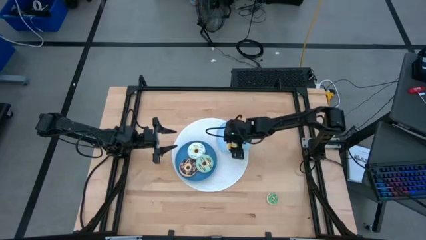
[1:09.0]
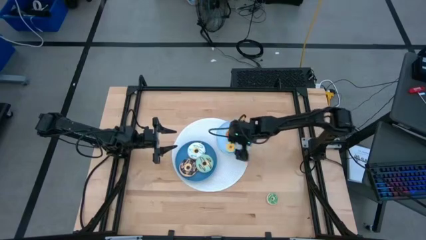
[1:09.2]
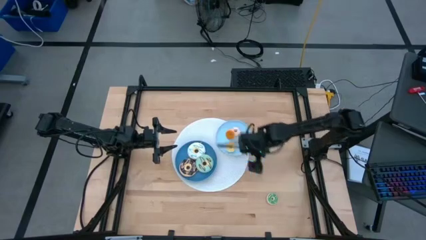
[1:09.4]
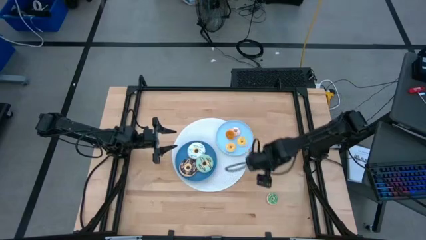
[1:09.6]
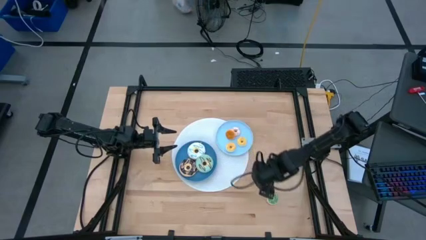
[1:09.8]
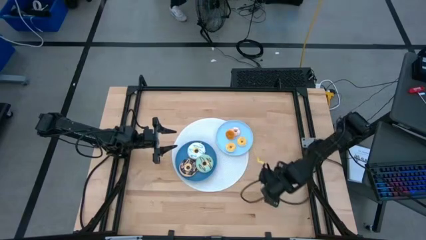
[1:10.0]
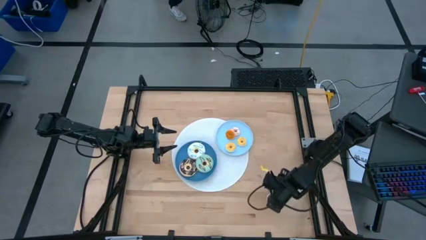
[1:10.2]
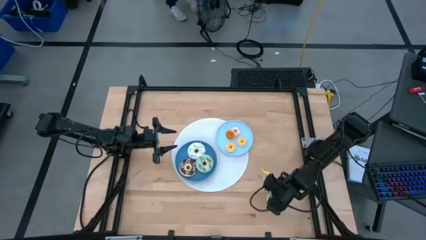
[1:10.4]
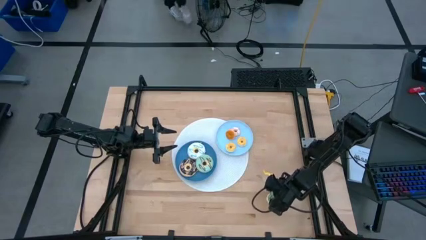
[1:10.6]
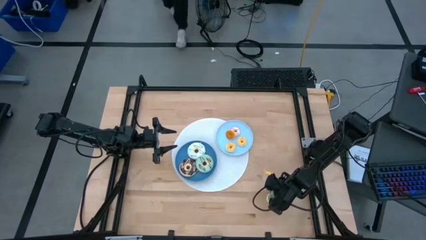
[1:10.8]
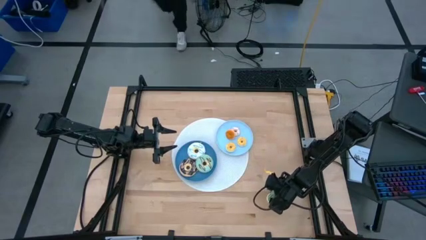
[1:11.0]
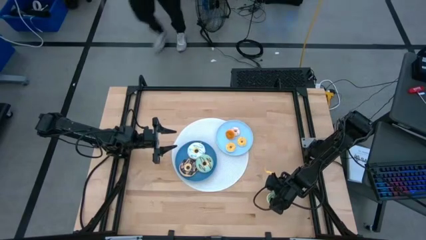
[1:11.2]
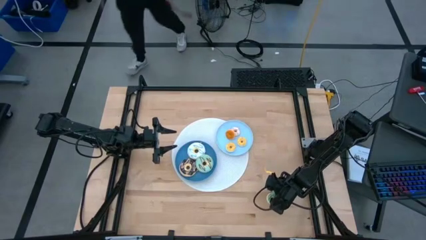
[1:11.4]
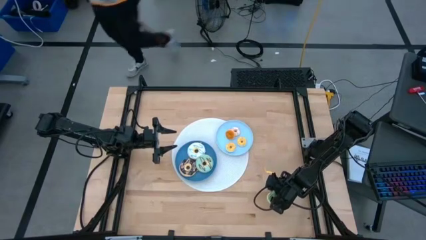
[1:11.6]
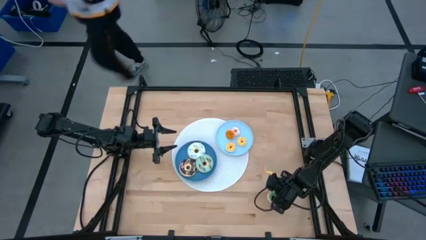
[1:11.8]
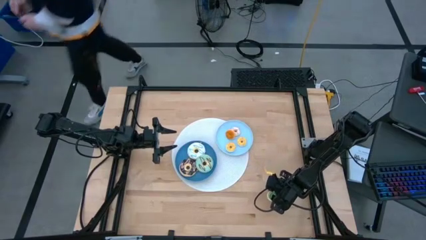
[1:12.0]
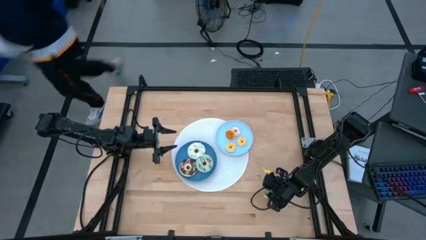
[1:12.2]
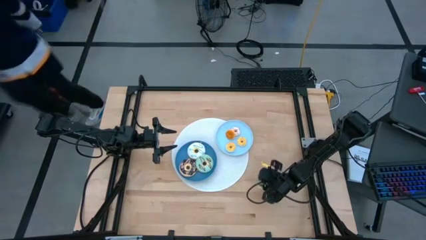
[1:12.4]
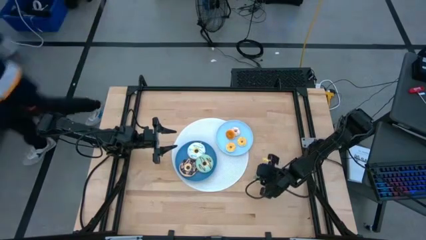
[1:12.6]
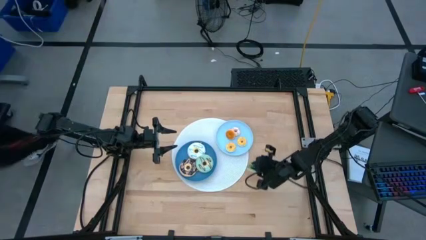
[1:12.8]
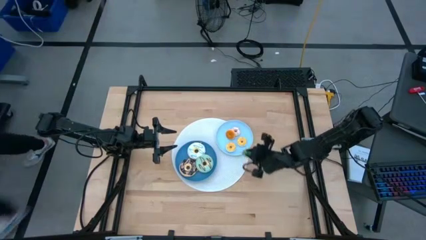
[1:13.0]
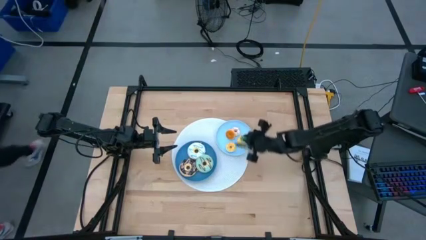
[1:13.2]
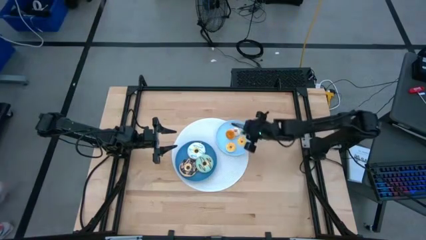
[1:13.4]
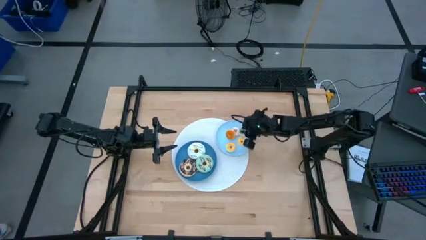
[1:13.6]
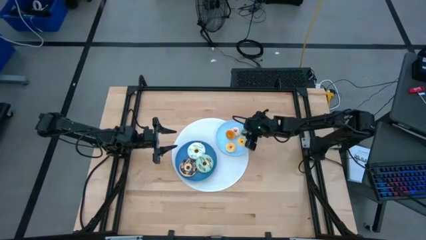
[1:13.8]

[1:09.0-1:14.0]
Task: Pick & Place donuts
Put the small green donut on the light blue plate

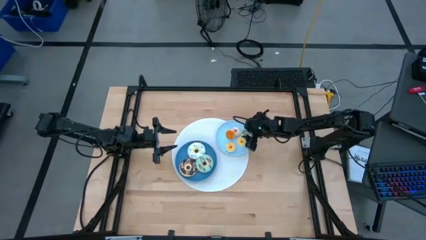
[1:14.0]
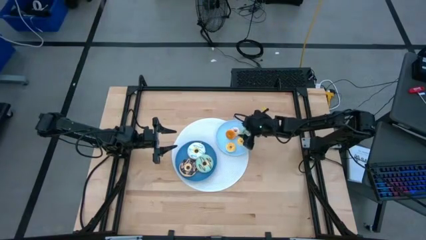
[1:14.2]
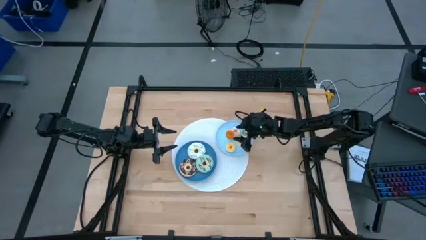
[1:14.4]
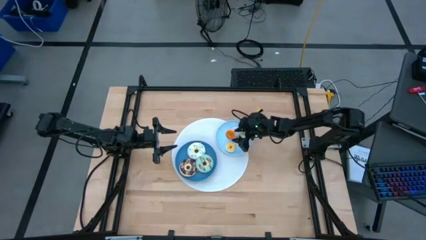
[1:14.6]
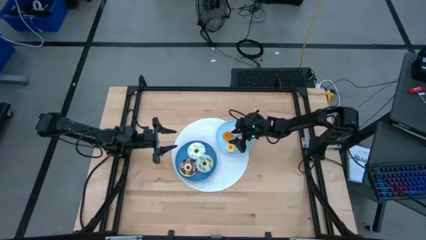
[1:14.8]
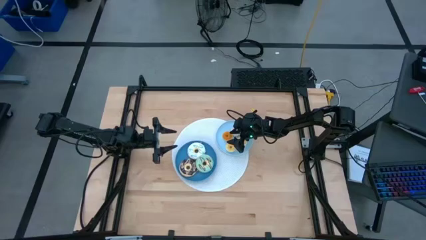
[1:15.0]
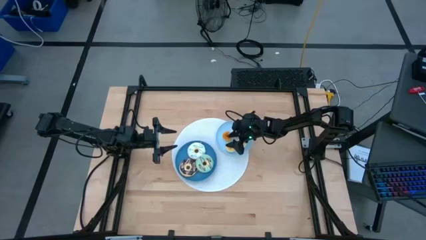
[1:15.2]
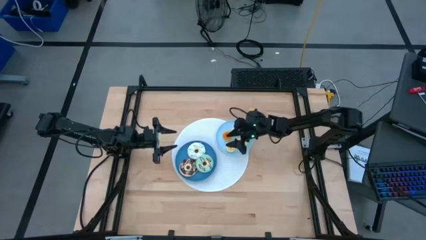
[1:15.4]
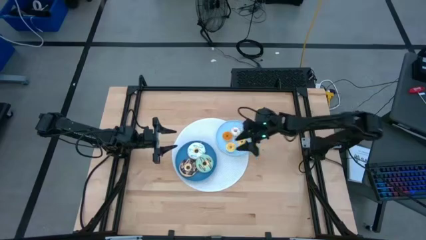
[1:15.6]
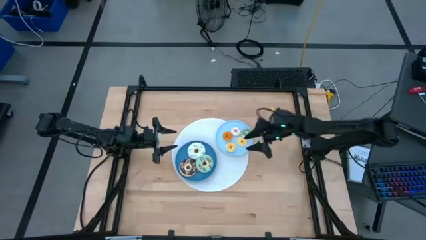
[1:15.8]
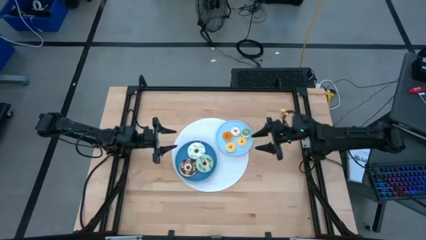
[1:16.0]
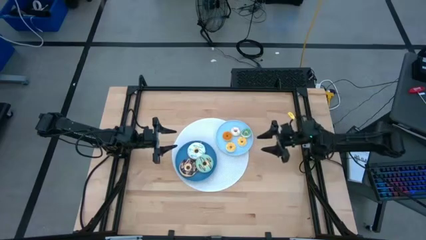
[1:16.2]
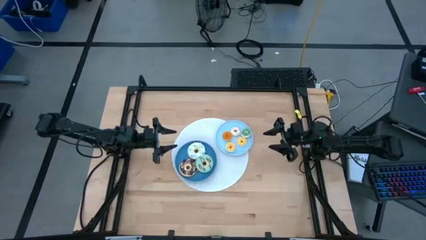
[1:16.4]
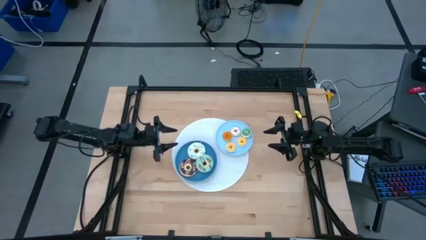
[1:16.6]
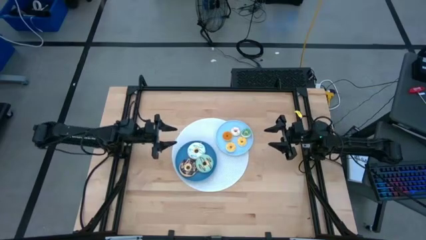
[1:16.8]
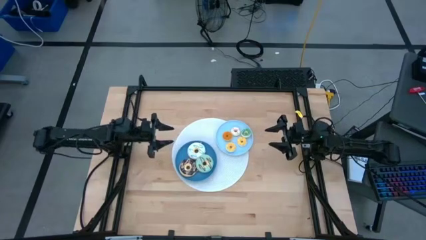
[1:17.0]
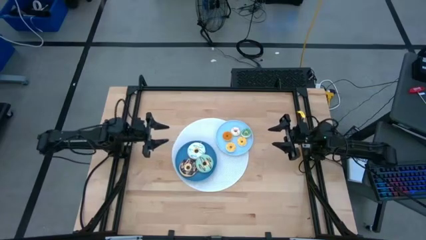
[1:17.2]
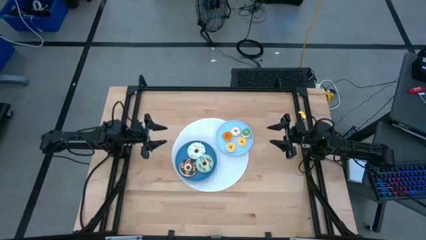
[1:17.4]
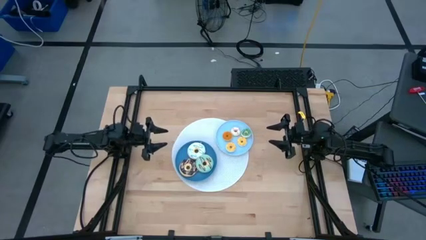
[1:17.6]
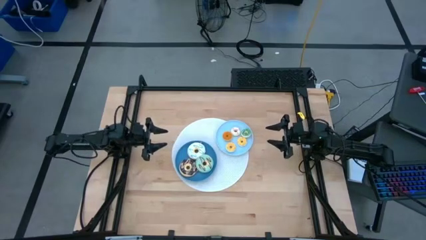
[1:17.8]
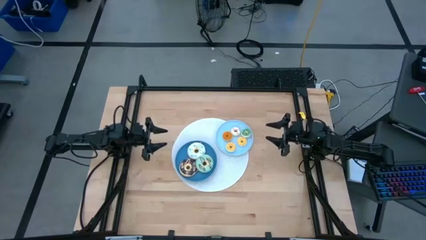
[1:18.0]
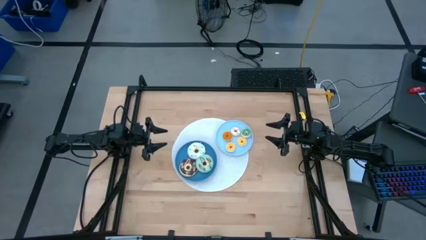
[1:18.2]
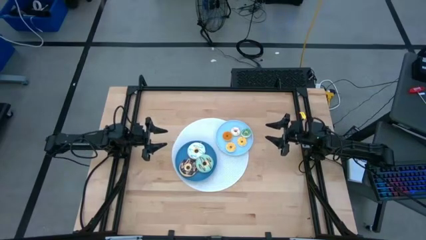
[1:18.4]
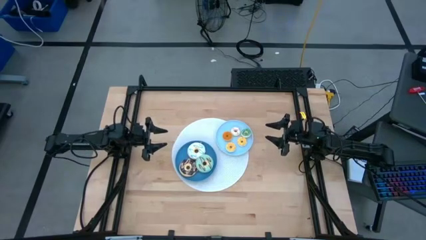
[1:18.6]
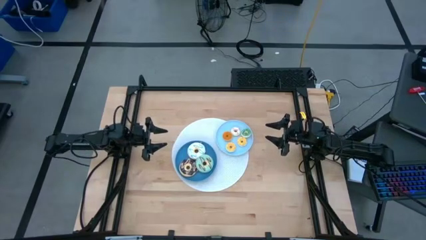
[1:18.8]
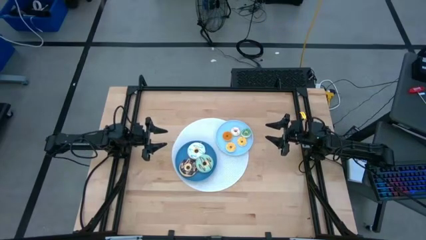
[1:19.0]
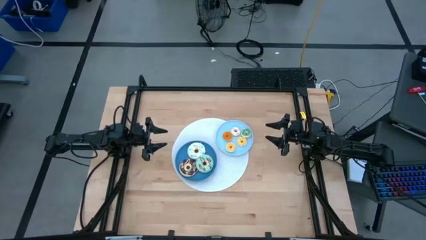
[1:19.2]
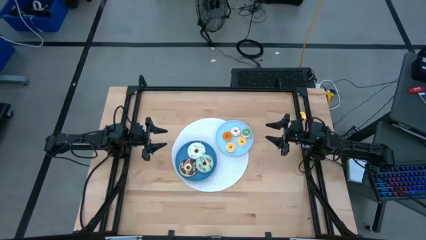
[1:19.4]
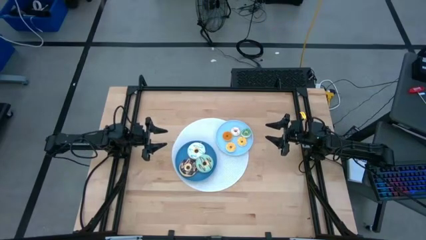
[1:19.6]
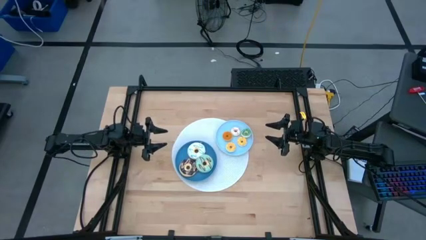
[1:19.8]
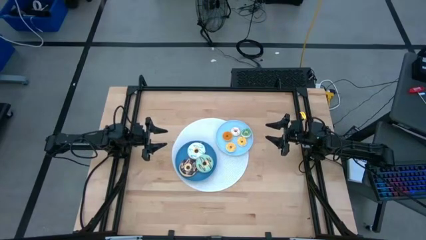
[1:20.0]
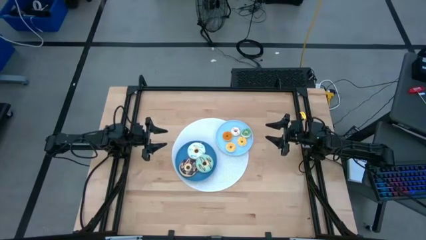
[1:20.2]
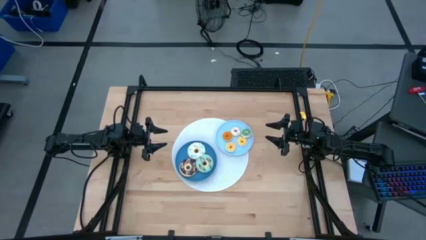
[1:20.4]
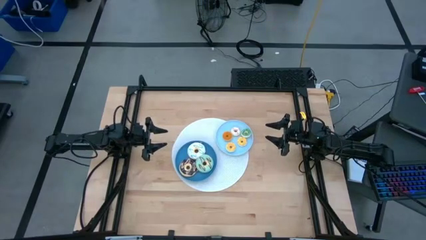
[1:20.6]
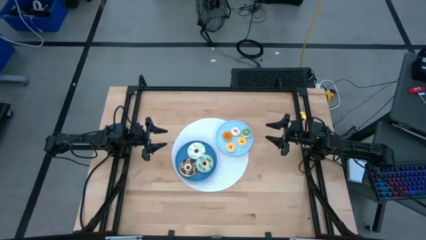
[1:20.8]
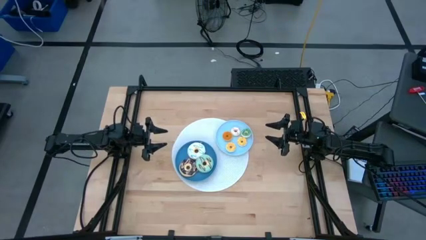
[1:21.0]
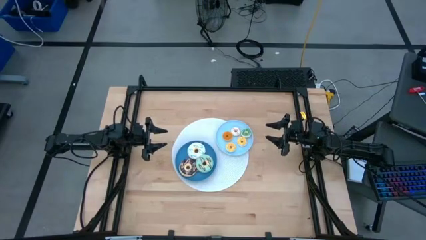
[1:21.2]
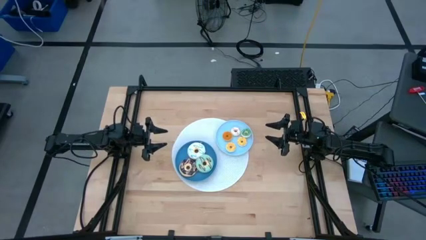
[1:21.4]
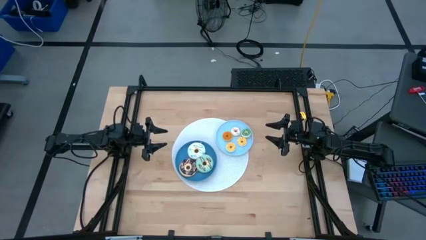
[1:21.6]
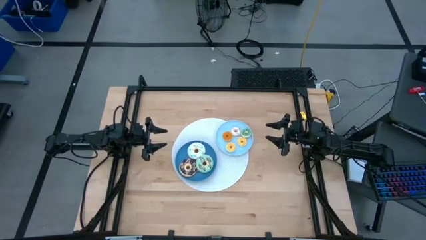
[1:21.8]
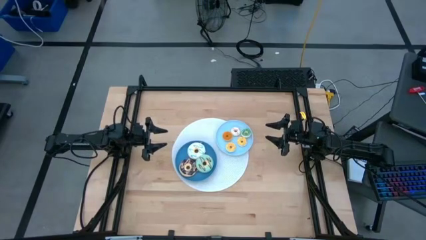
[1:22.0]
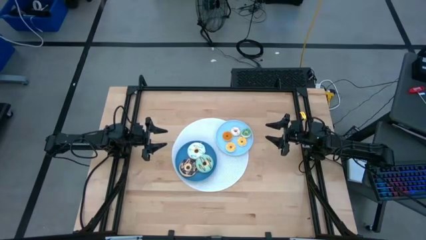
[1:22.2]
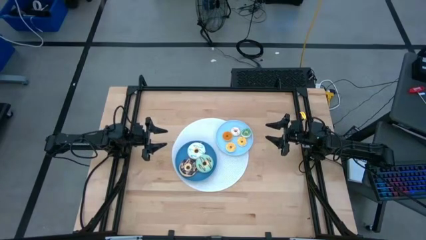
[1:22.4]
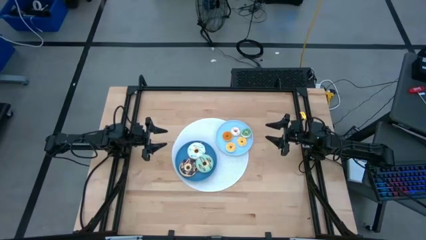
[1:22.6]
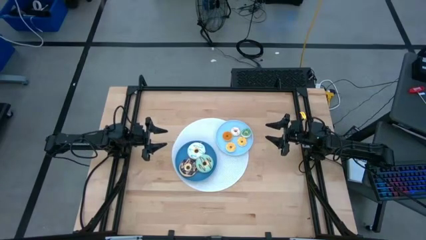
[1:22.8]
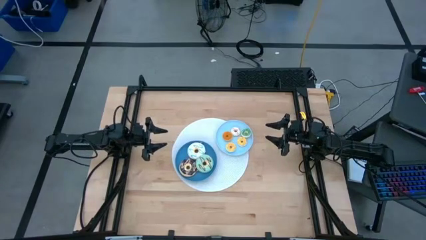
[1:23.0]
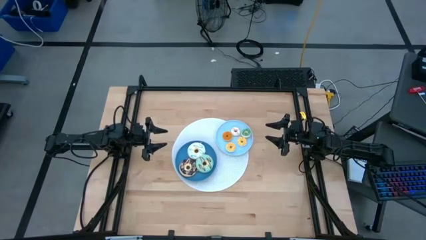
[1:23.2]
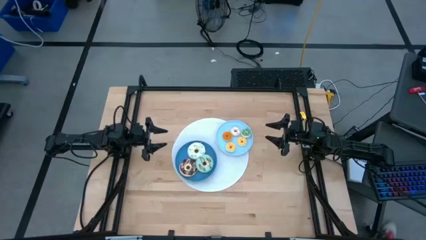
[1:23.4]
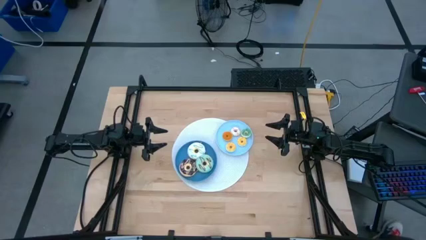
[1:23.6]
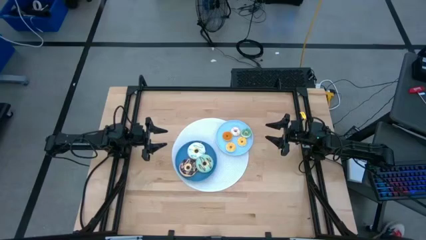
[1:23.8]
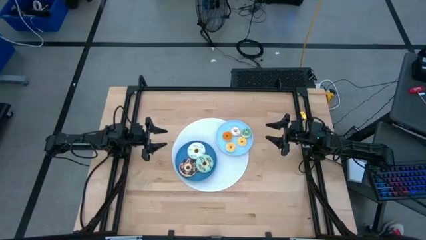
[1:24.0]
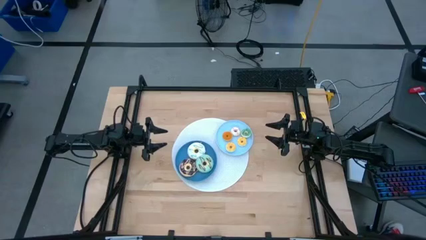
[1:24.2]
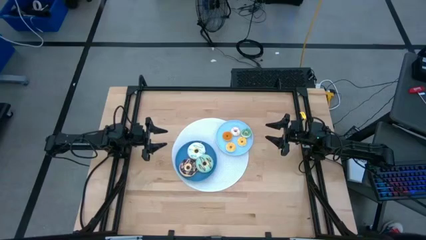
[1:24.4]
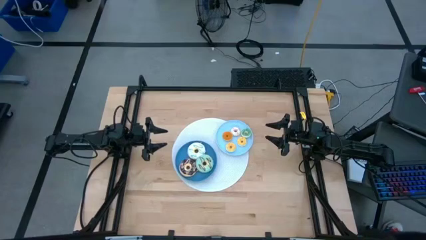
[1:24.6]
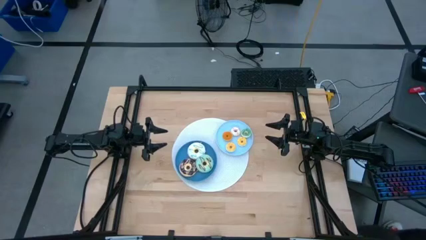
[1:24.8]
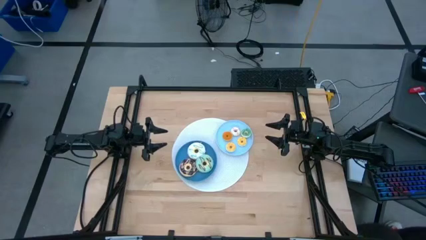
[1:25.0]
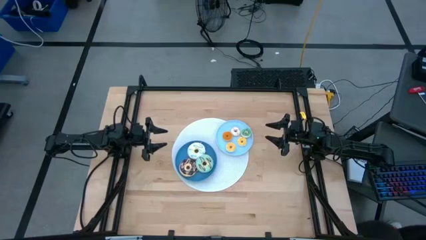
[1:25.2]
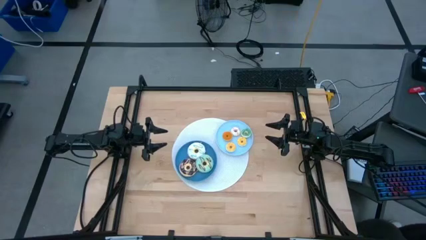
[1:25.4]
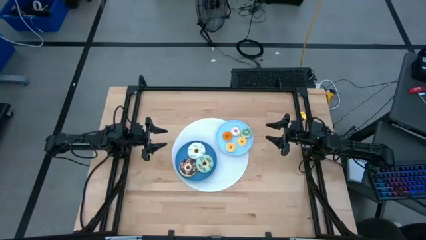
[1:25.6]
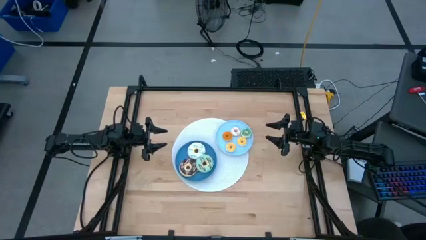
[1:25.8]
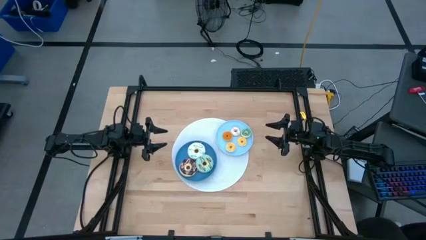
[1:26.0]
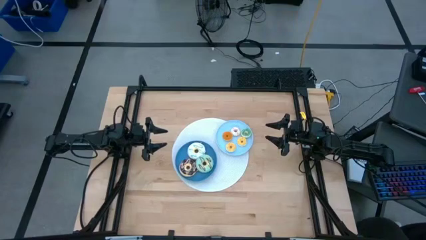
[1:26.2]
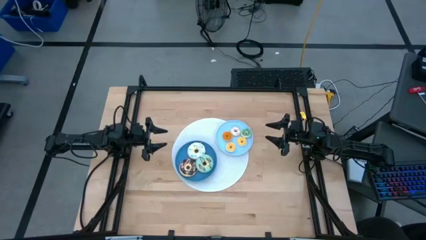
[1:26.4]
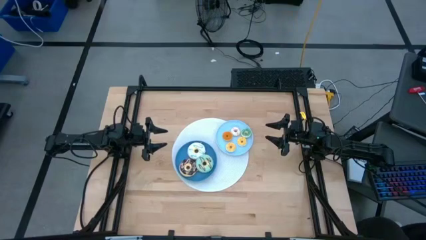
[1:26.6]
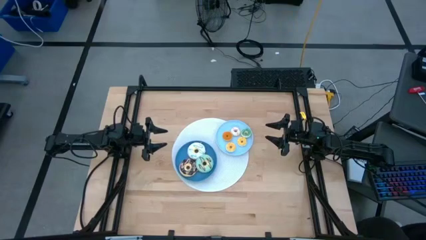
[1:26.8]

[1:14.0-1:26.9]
Return to Home Position
